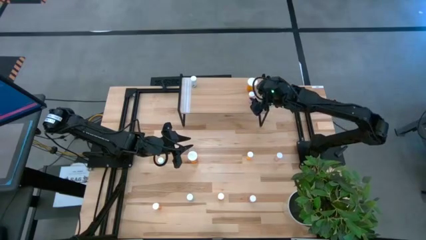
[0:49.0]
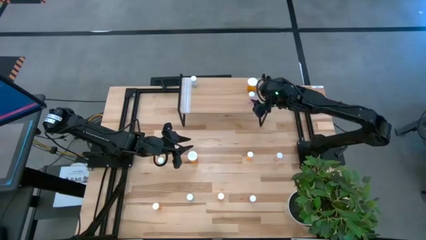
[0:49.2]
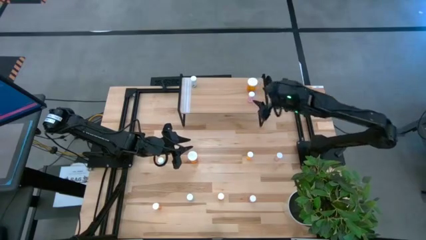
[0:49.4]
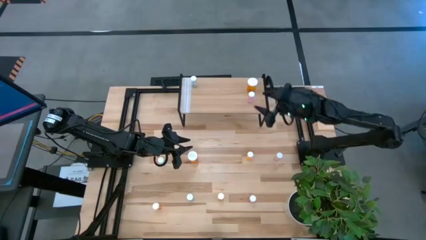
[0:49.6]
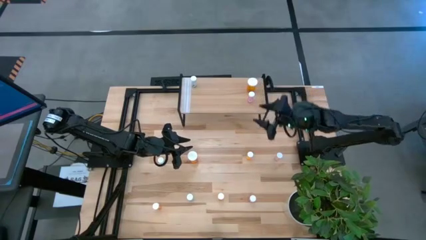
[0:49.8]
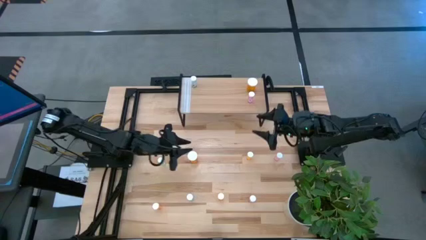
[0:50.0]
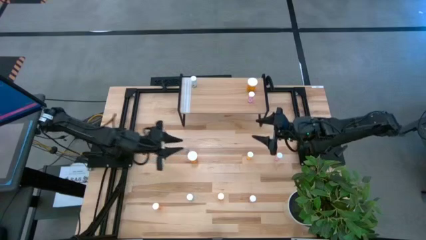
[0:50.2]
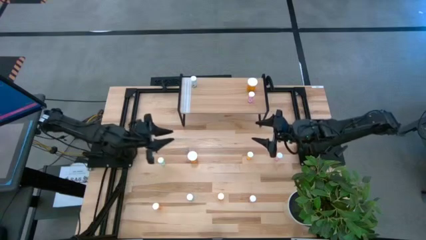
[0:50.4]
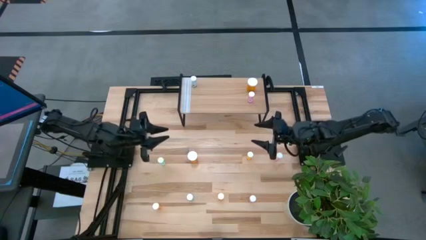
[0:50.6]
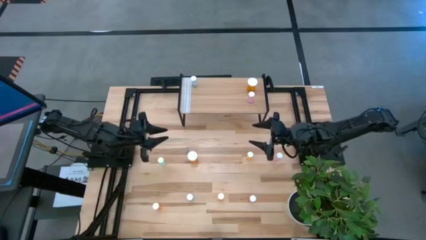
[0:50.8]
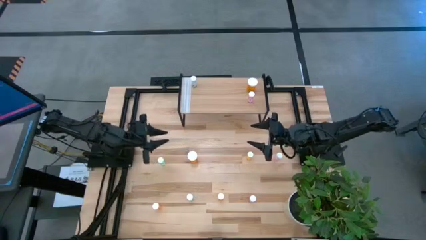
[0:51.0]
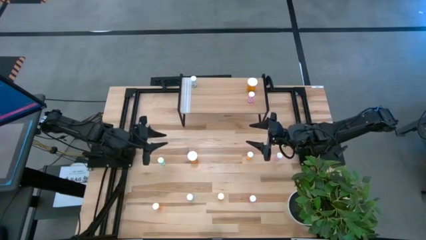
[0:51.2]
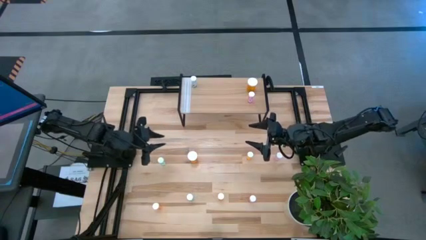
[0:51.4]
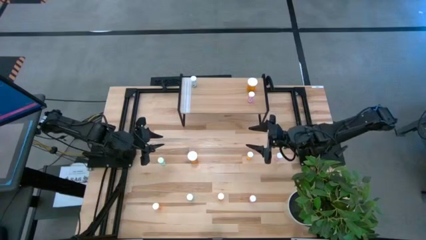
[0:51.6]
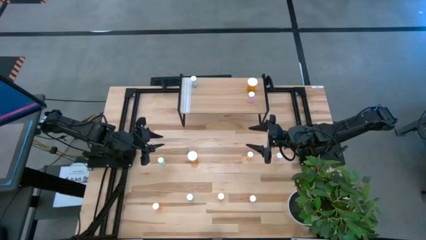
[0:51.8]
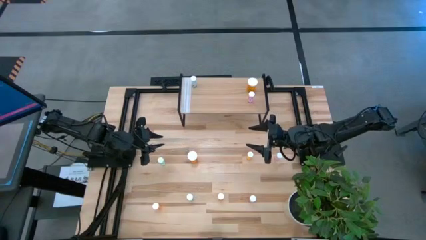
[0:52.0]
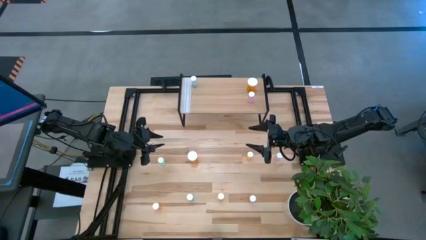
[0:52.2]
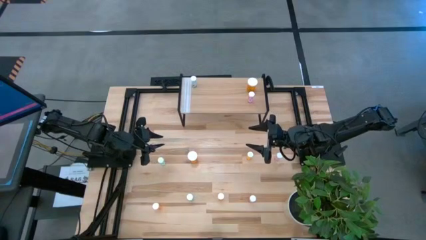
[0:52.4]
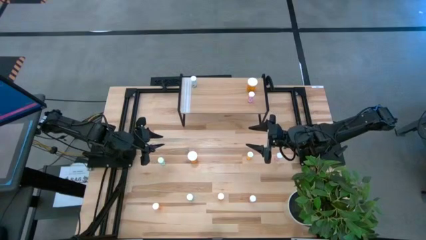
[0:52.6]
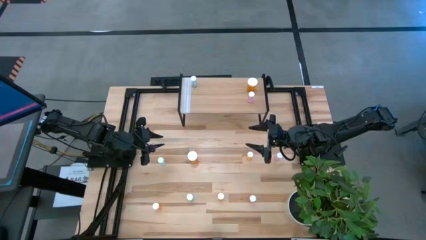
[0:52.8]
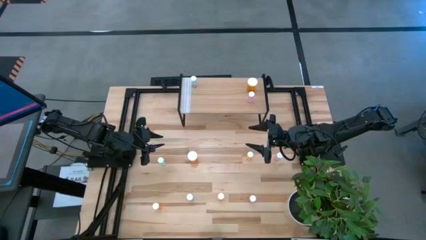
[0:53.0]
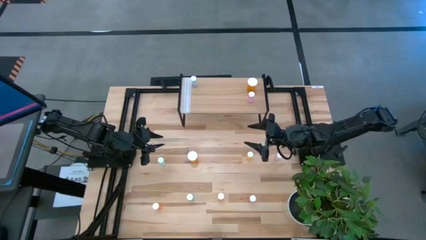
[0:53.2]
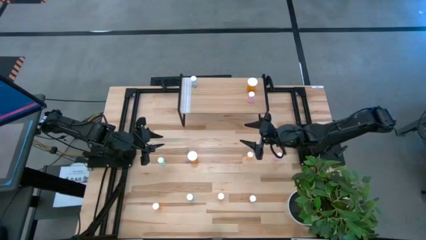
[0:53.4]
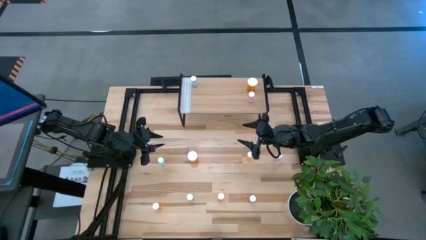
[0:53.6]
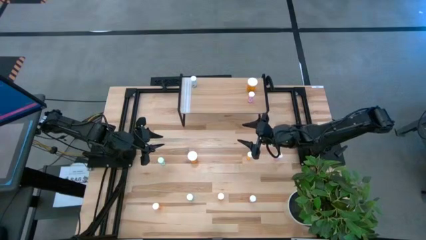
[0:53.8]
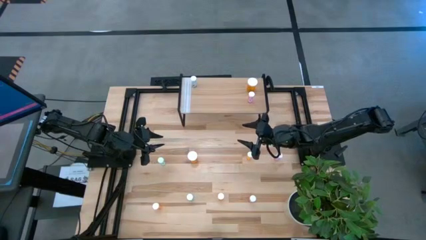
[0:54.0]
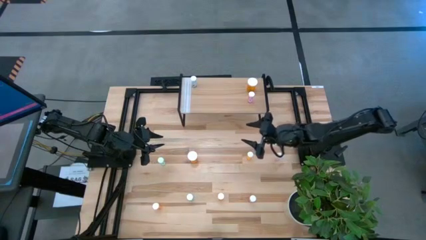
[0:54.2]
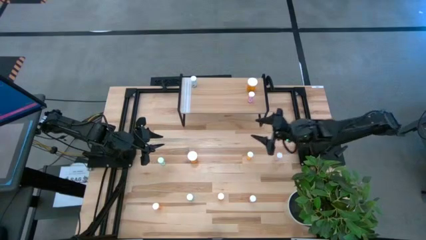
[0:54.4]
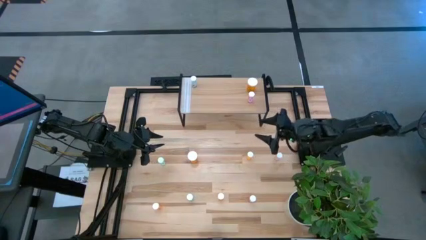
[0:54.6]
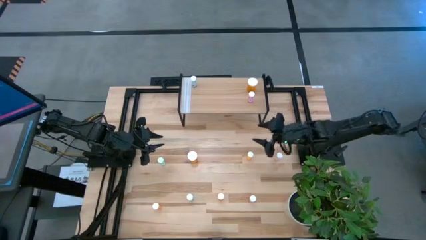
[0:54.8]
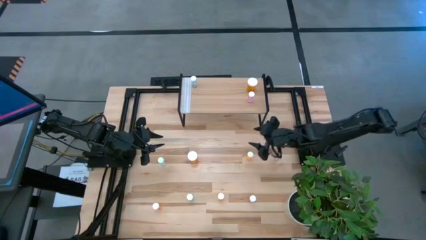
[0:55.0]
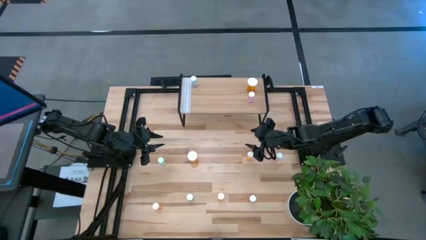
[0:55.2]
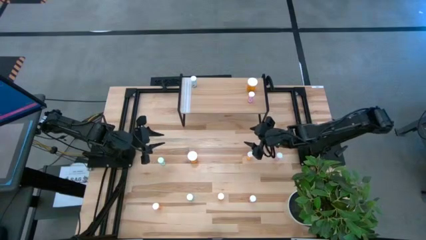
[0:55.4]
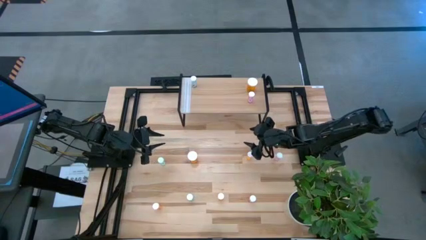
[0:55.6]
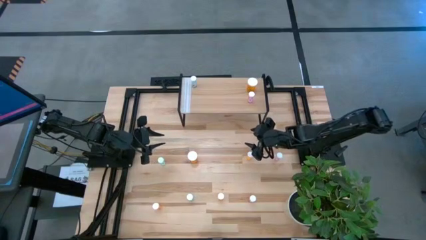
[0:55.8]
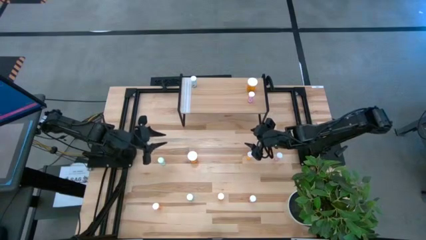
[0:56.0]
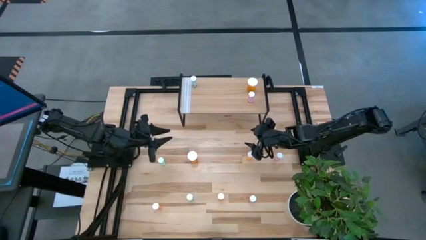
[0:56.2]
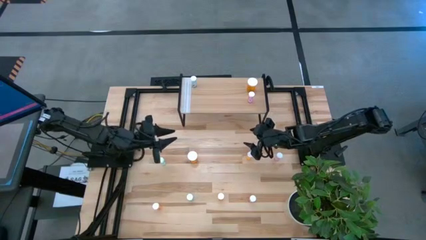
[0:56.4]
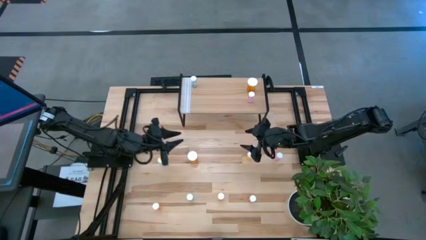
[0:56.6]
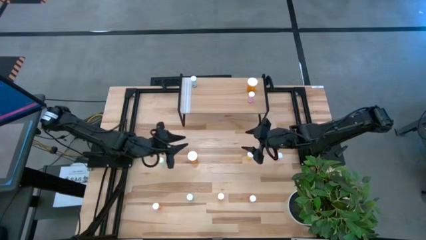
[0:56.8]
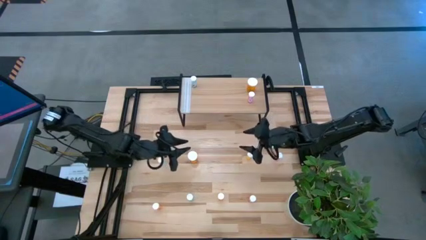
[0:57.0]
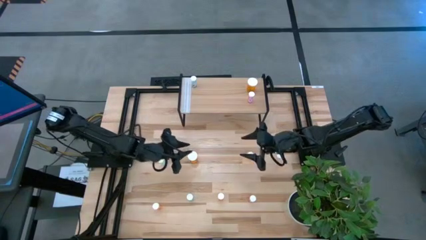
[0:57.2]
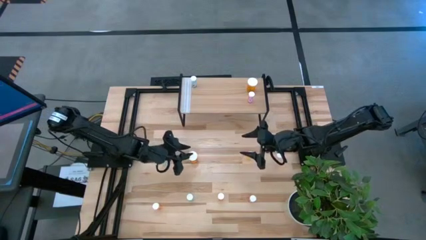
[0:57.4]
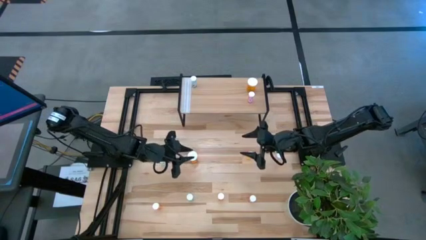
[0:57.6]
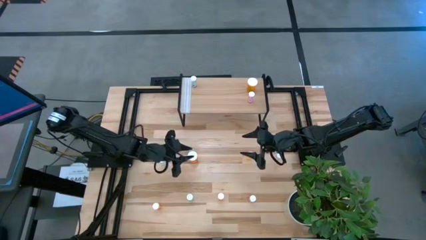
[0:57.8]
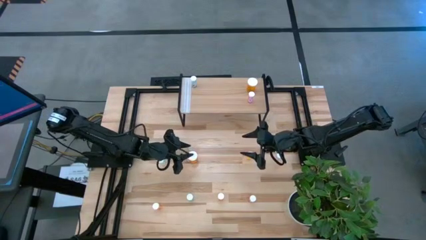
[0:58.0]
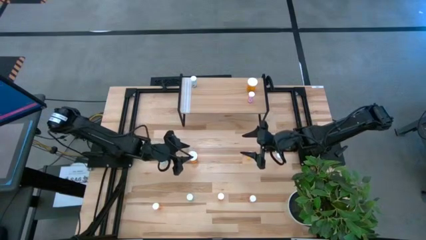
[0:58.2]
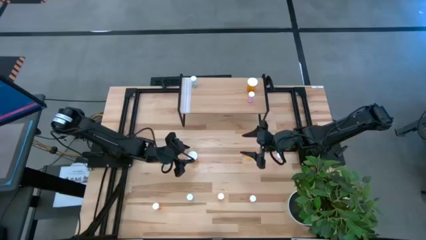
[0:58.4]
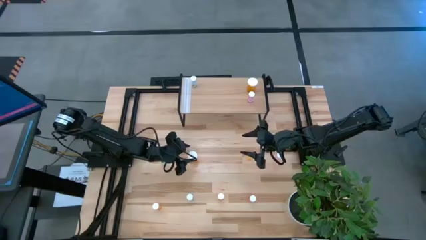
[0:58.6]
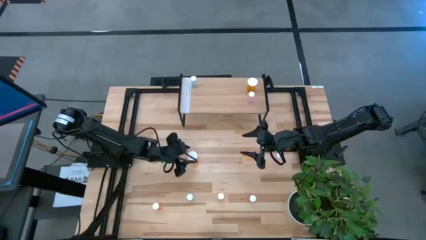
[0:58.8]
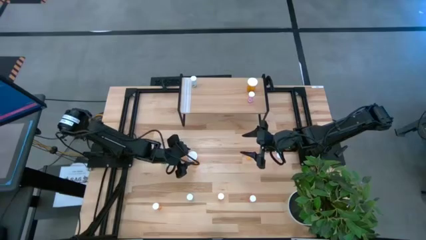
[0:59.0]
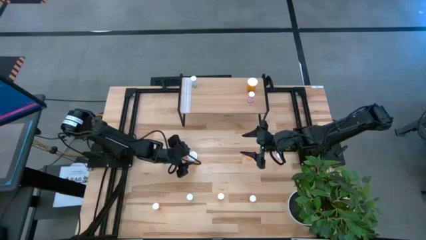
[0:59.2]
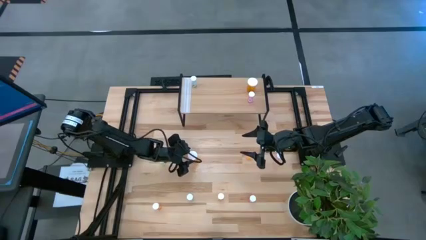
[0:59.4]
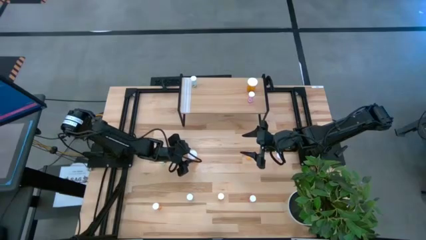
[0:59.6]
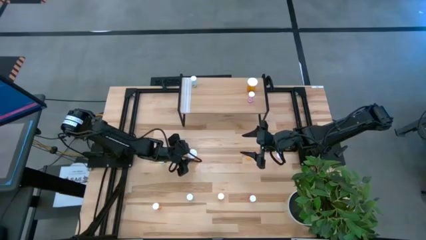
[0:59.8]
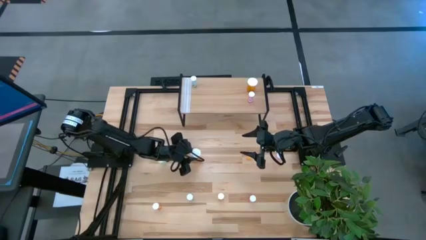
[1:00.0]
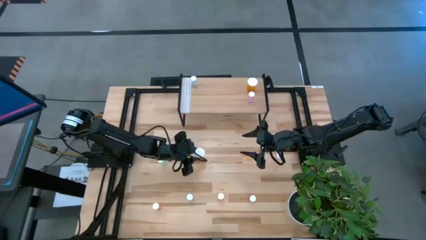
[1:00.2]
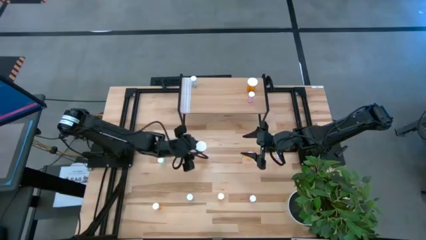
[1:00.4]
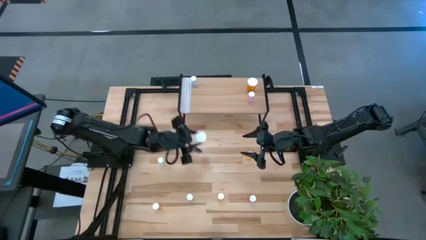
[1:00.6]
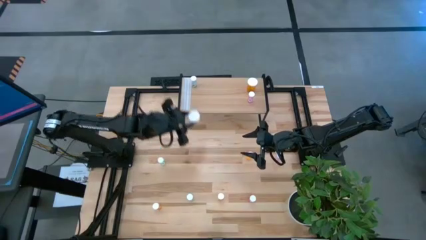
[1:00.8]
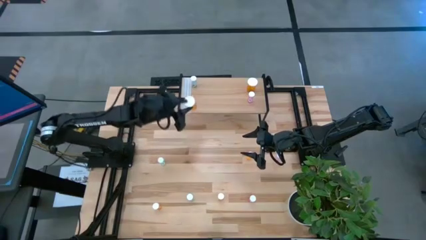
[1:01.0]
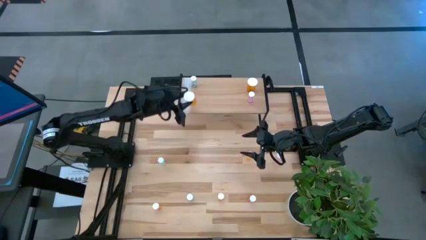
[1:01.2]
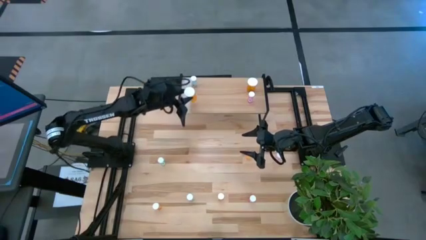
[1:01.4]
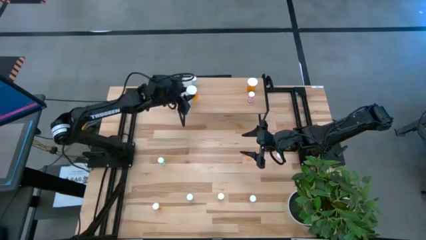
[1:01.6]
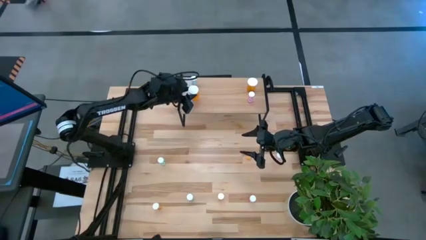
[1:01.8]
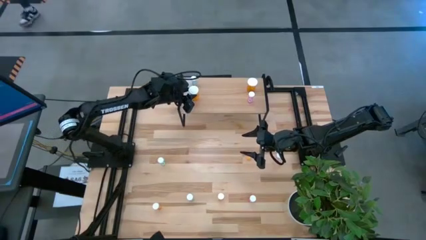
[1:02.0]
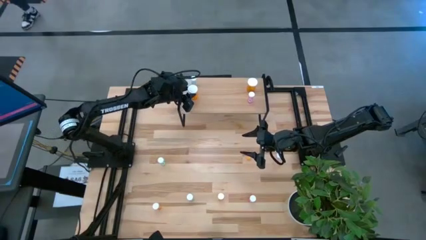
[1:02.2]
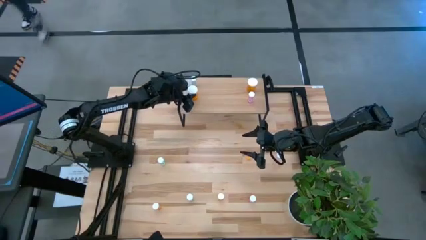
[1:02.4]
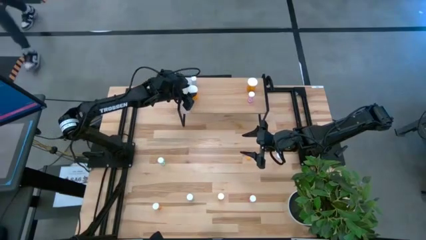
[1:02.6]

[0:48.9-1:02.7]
Task: Pick and place medicine bottles onto shelf by color
Put the big orange pill bottle on the shelf
